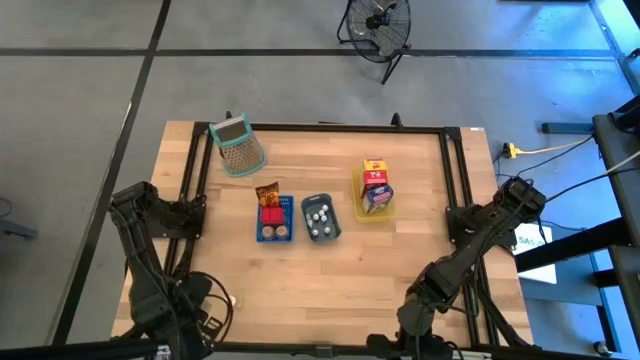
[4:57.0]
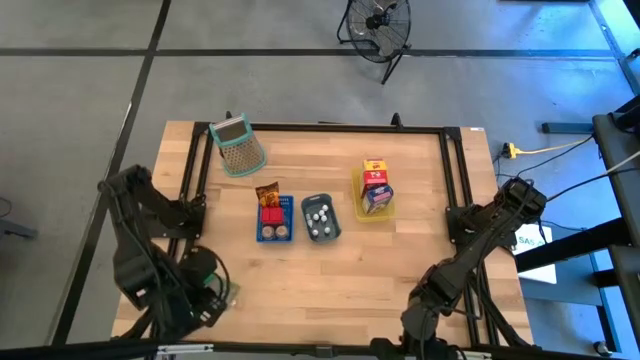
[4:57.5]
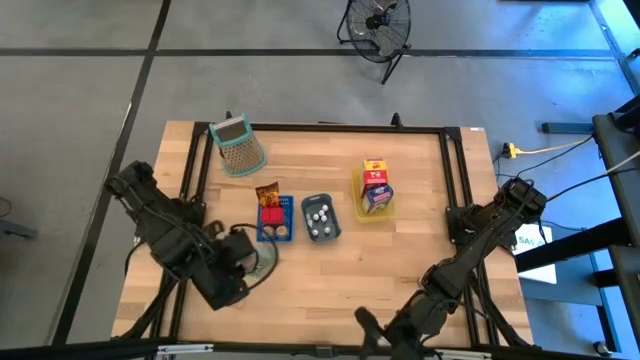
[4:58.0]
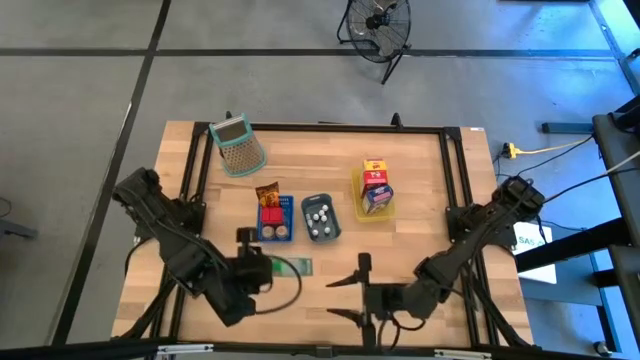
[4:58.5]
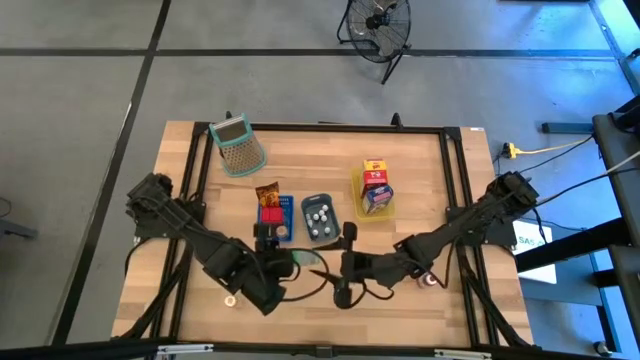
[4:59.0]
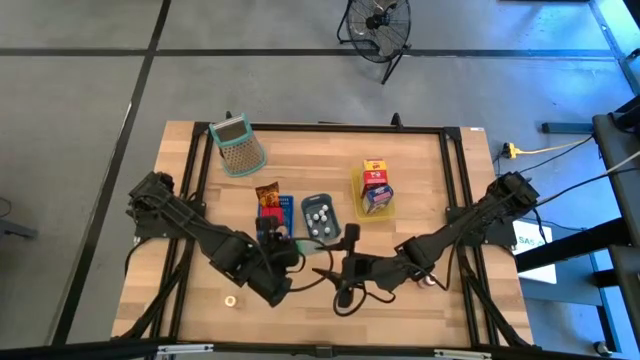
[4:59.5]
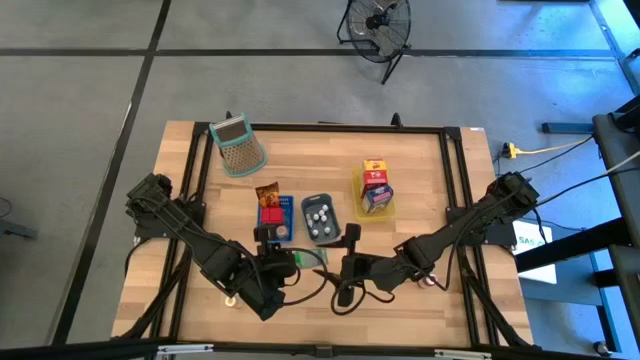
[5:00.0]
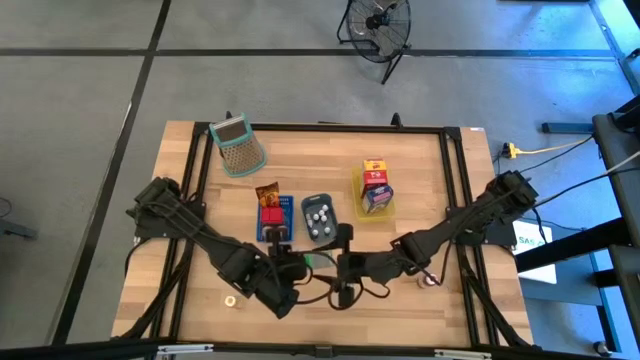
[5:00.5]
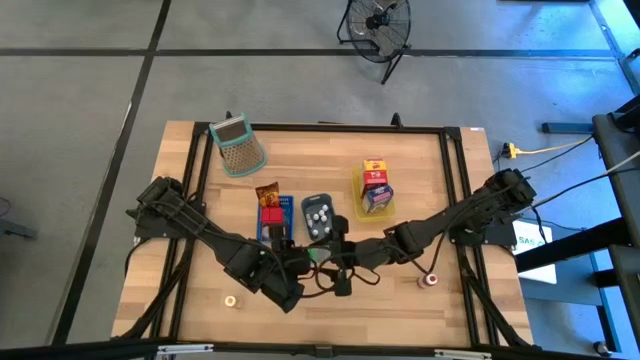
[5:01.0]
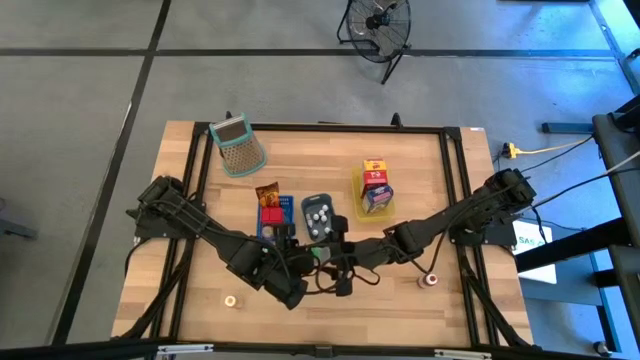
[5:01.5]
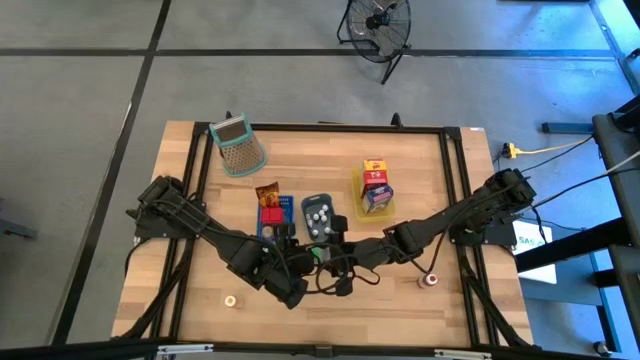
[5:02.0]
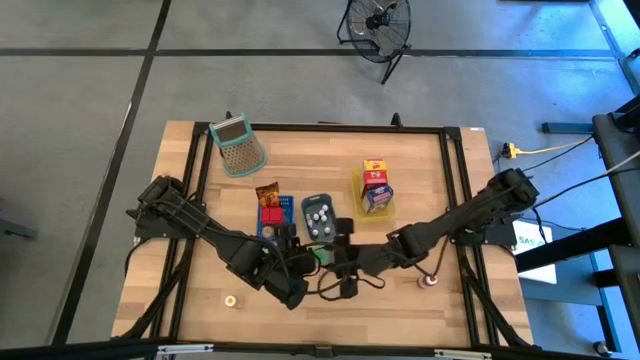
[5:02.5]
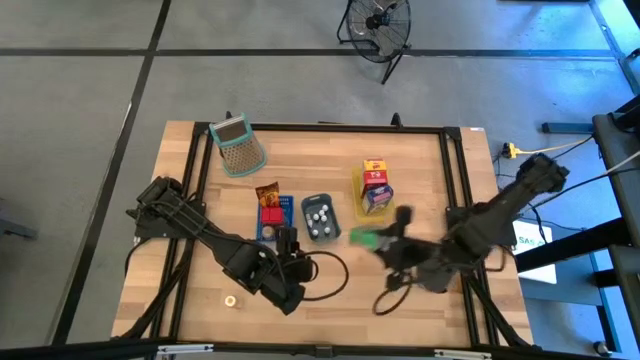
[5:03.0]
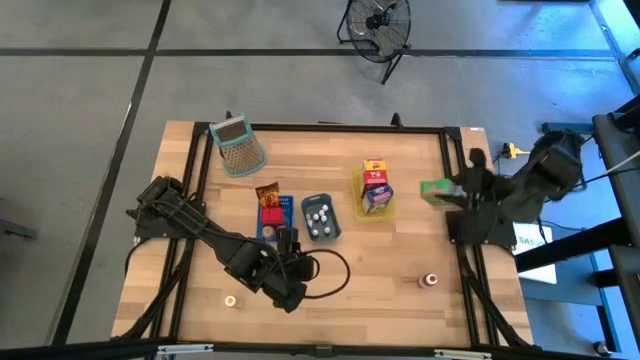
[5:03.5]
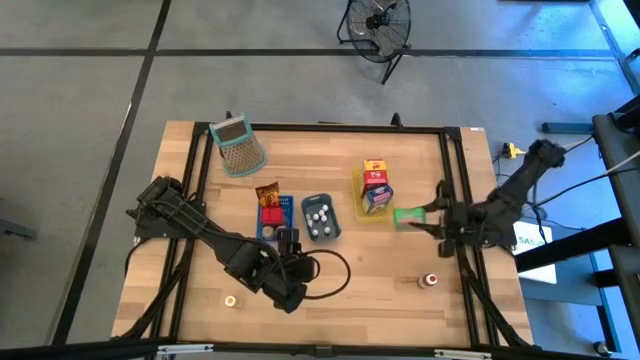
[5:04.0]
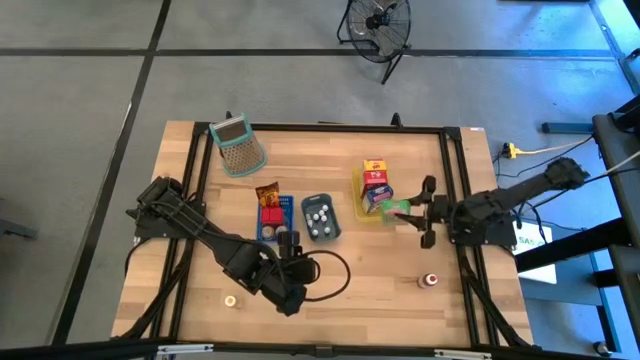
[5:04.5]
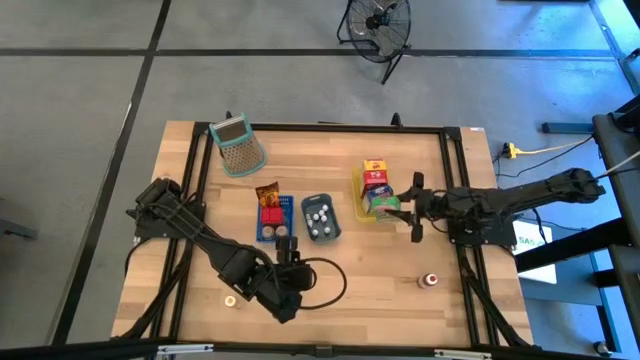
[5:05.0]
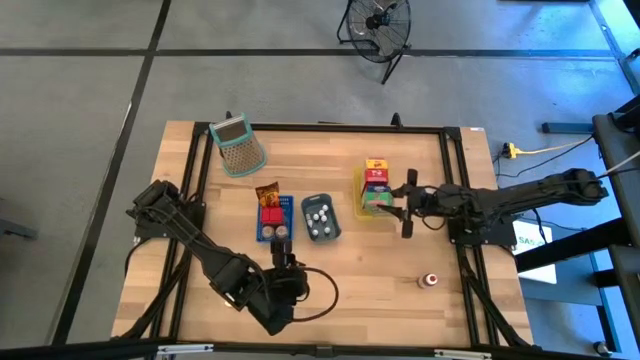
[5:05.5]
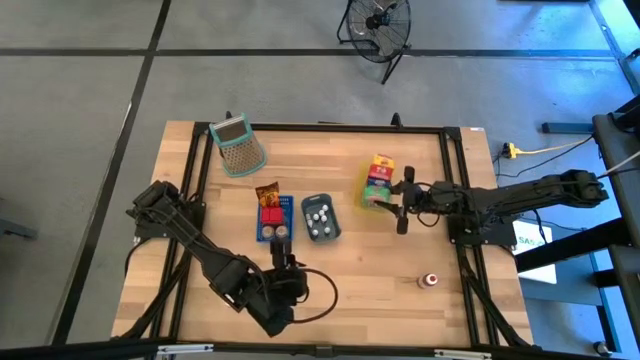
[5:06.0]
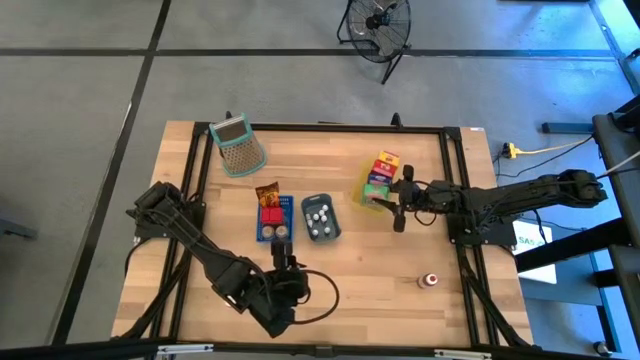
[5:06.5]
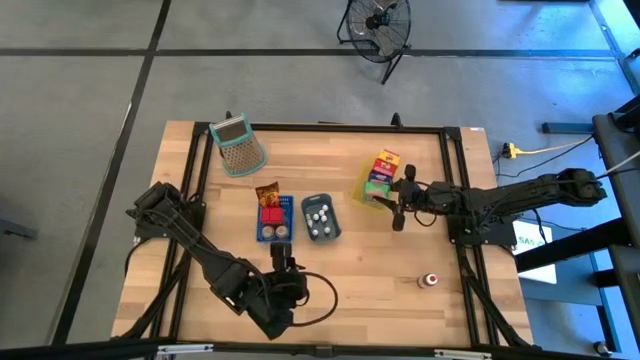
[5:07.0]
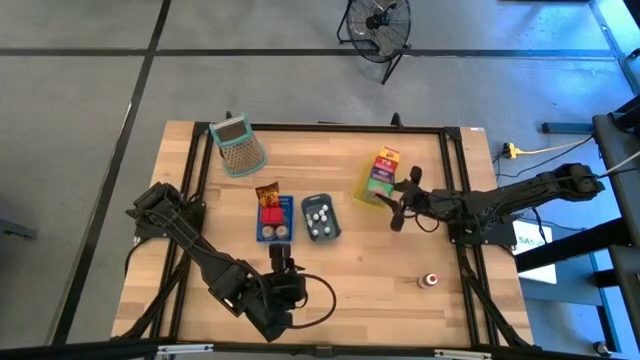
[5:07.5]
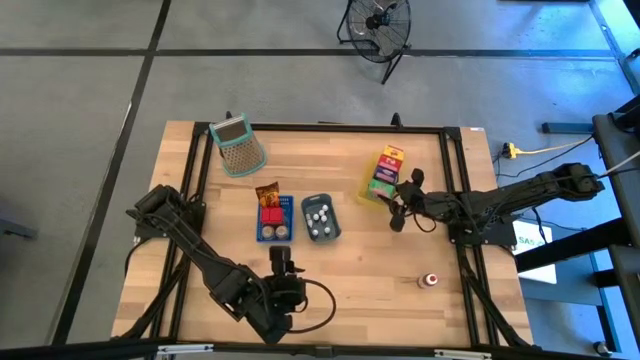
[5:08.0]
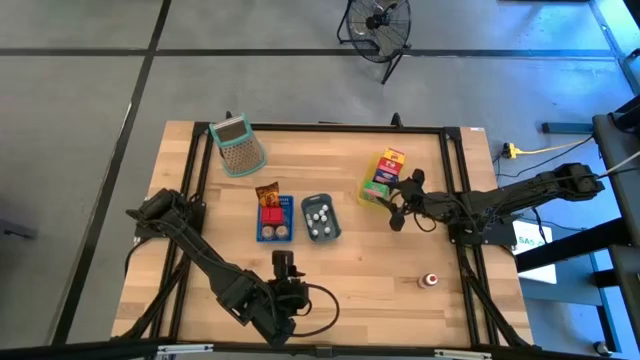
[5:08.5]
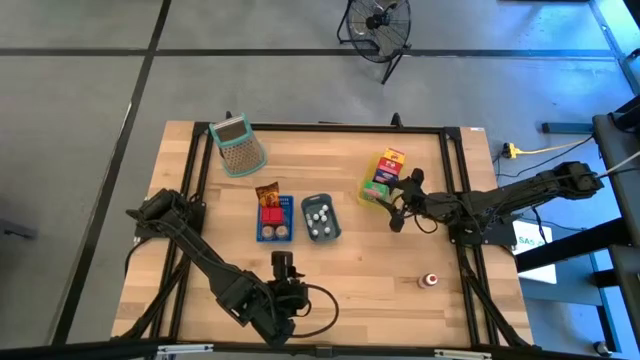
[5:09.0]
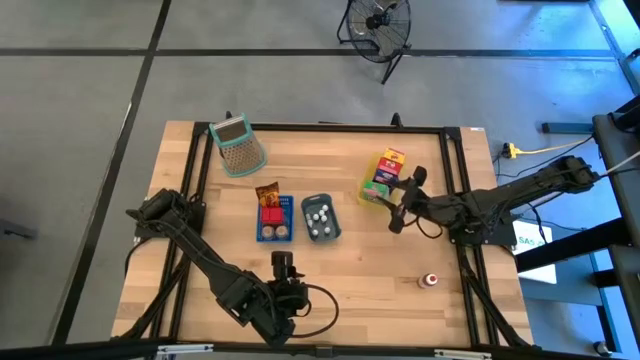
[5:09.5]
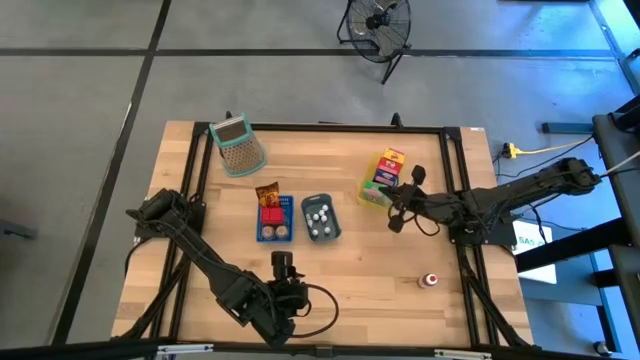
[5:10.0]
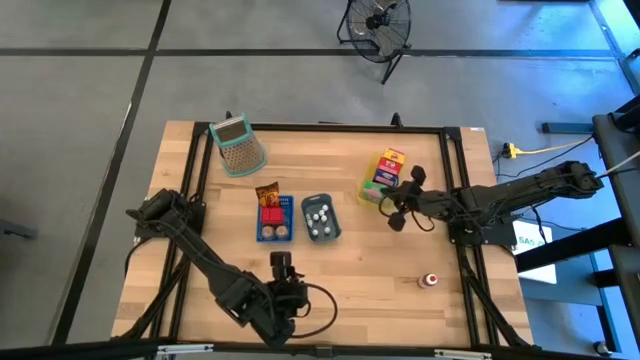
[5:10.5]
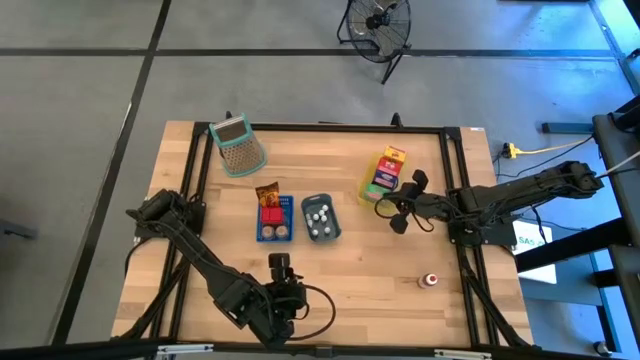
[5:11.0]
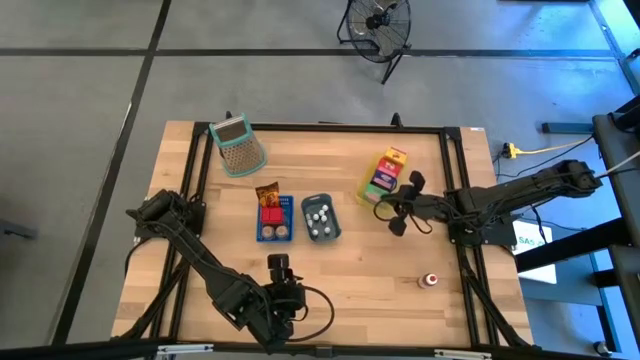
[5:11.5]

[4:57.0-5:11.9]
Task: Pick & Place Kitchen Items
Put the green cereal box into the yellow bin

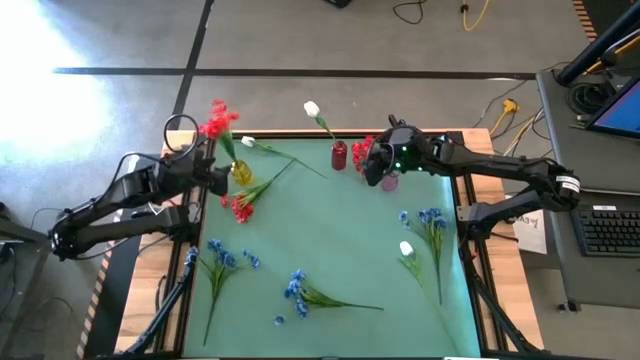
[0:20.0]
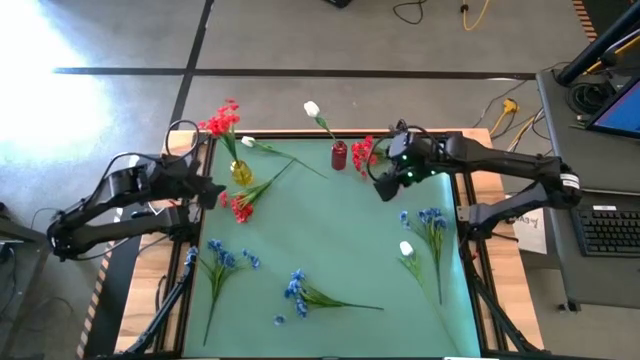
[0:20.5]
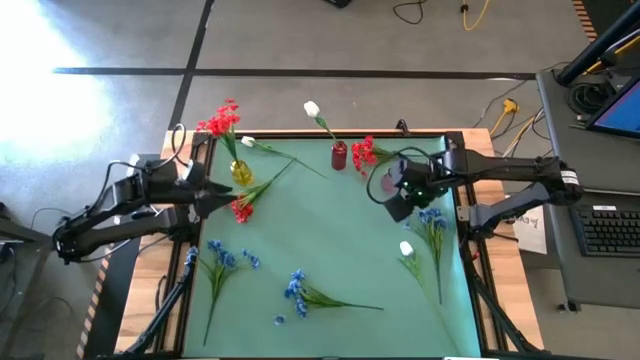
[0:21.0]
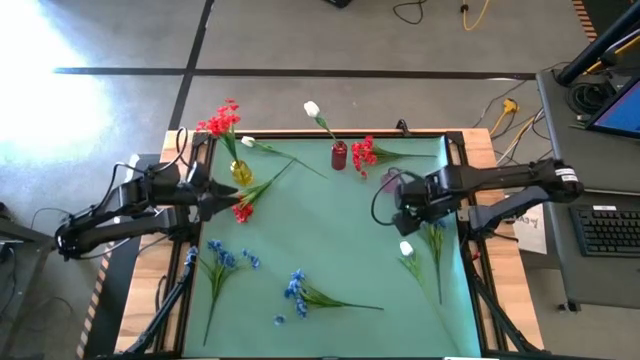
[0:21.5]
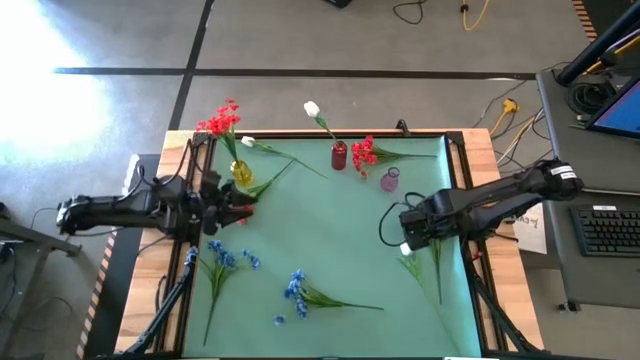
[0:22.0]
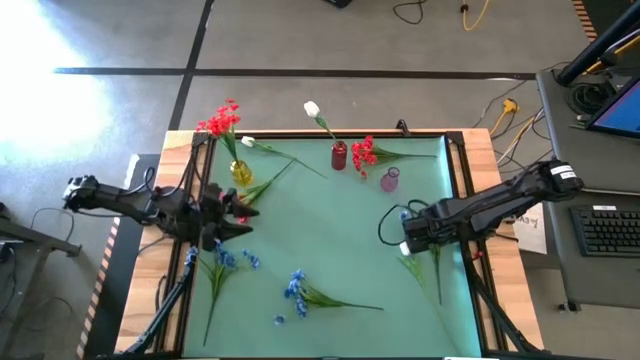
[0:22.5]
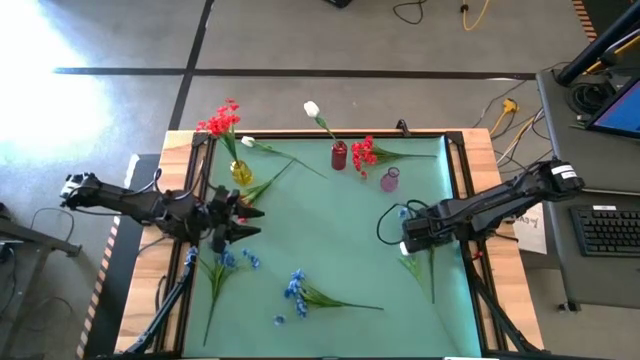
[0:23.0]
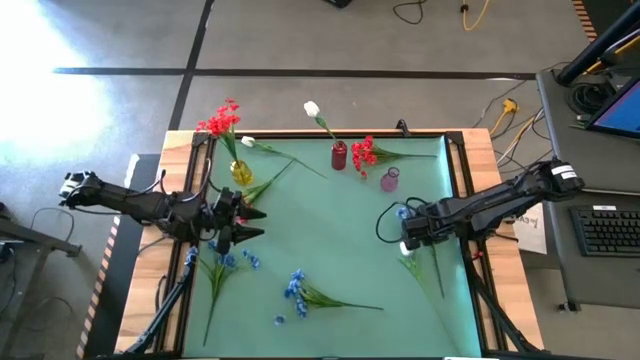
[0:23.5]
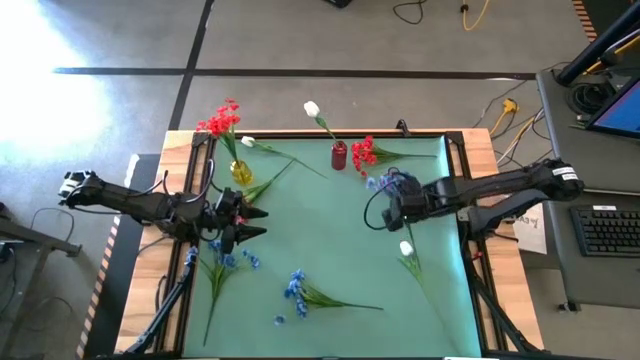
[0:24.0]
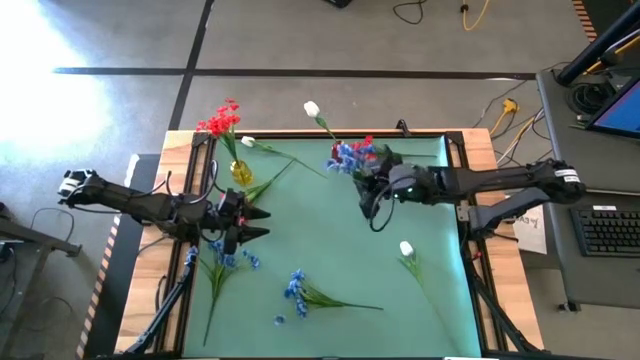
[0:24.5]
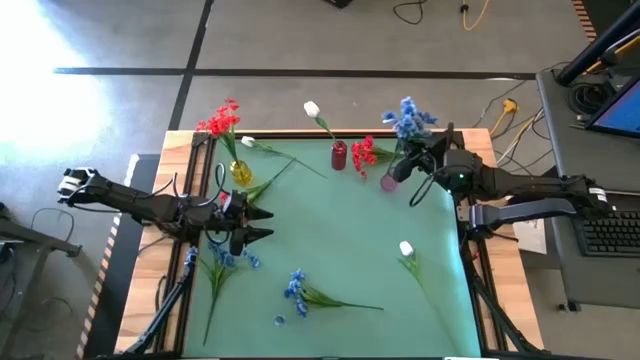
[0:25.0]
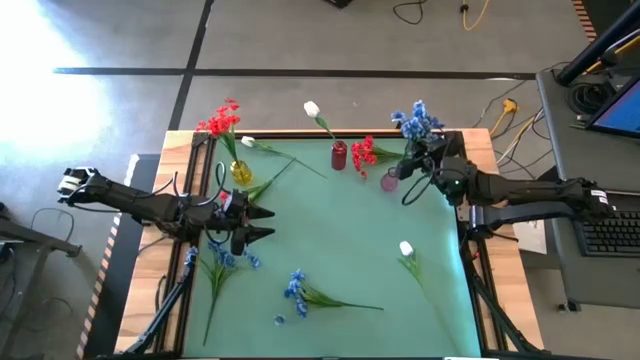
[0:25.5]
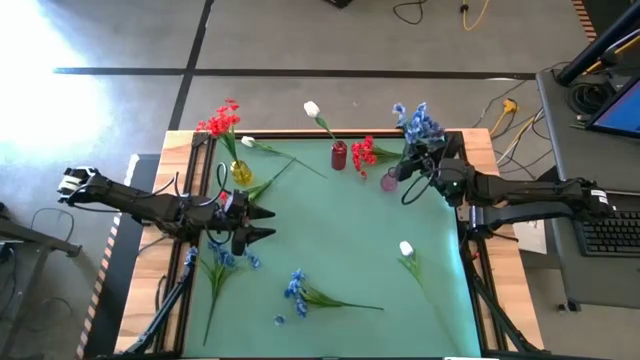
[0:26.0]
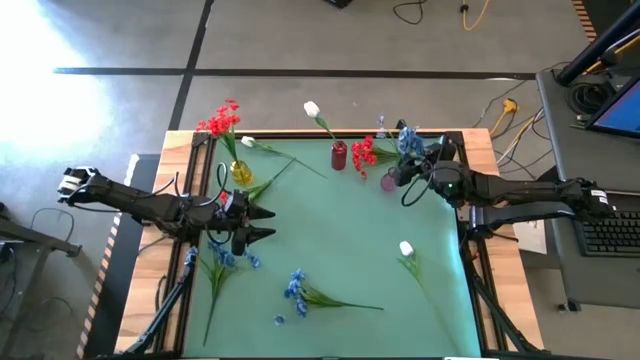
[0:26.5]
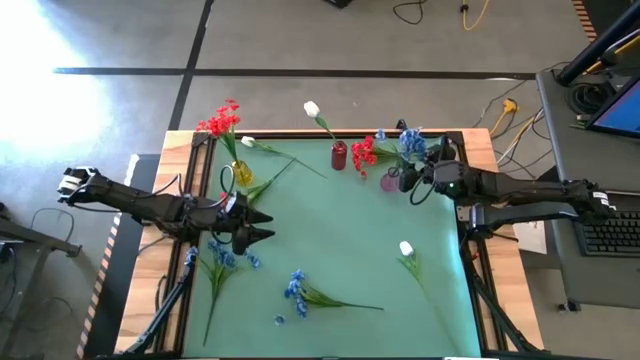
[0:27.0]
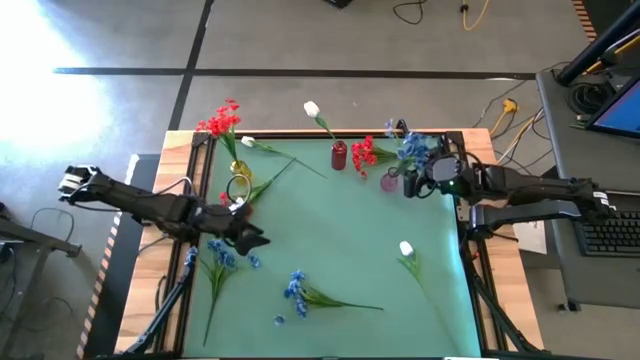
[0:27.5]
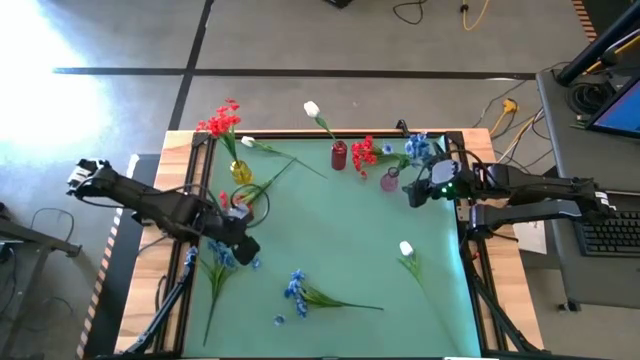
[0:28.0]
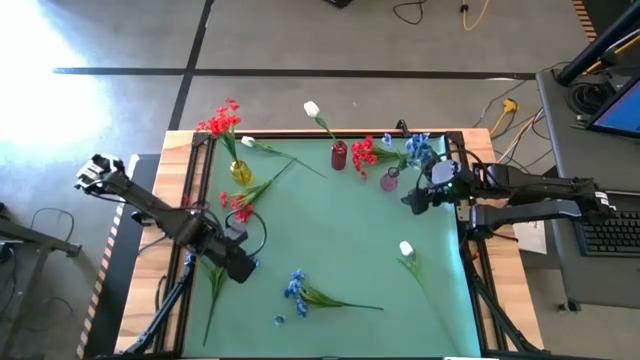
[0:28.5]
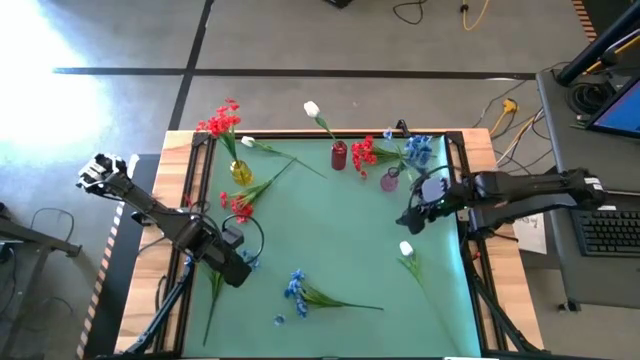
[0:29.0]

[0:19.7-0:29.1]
Task: Sort flowers into vase by color
Put the right blue flower into the violet vase
